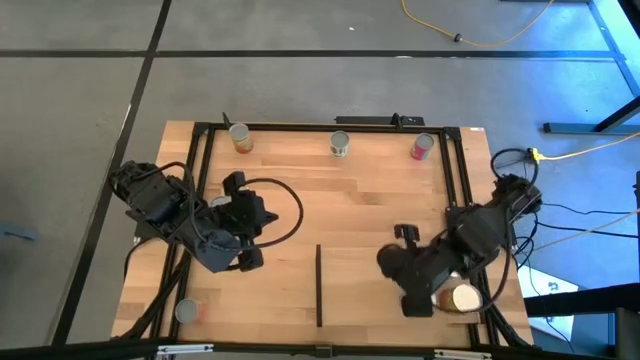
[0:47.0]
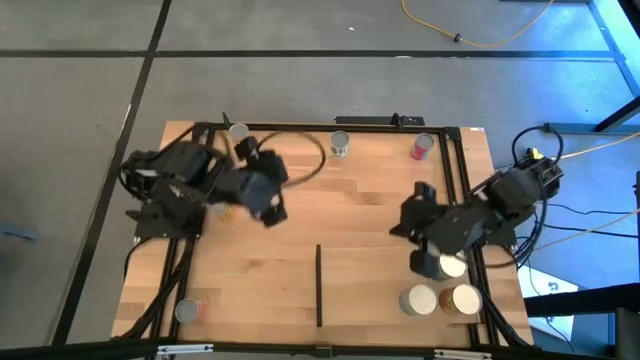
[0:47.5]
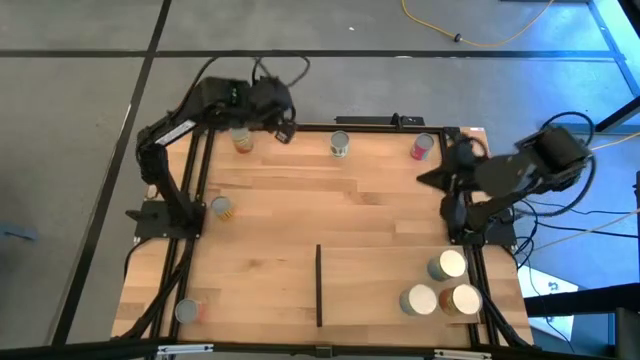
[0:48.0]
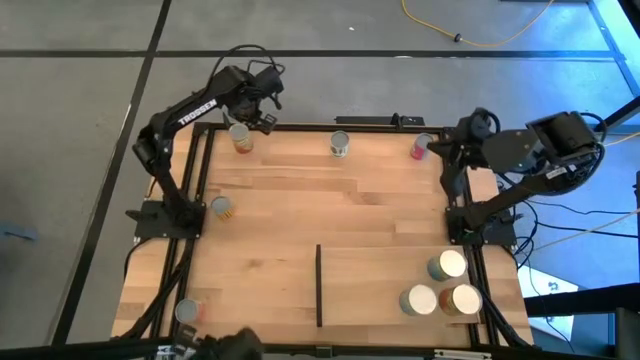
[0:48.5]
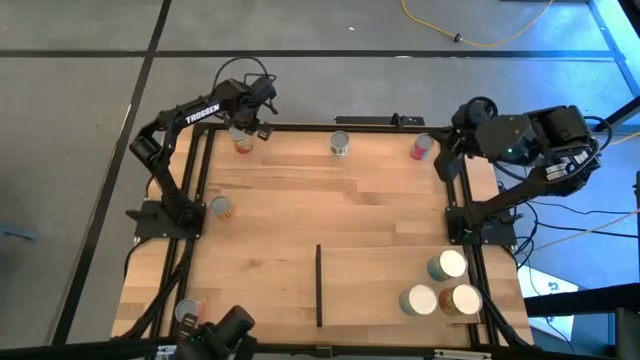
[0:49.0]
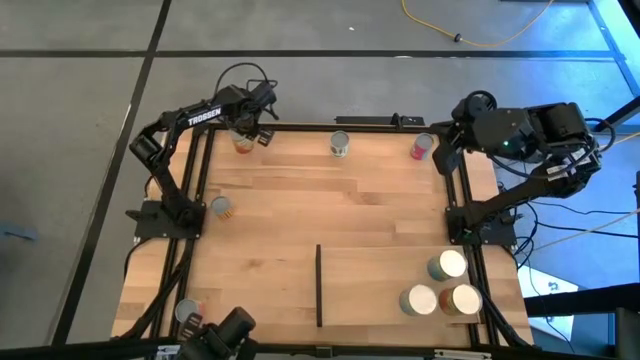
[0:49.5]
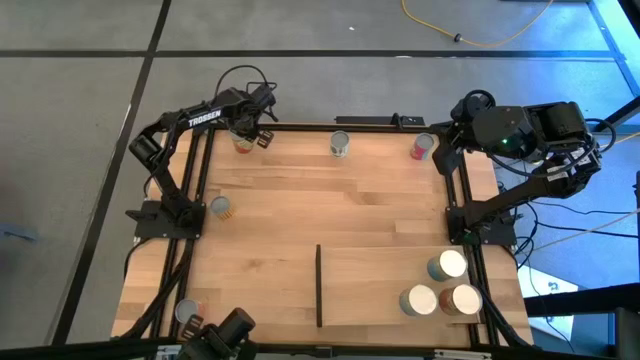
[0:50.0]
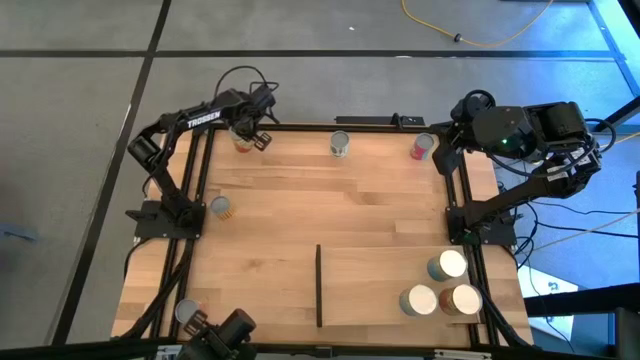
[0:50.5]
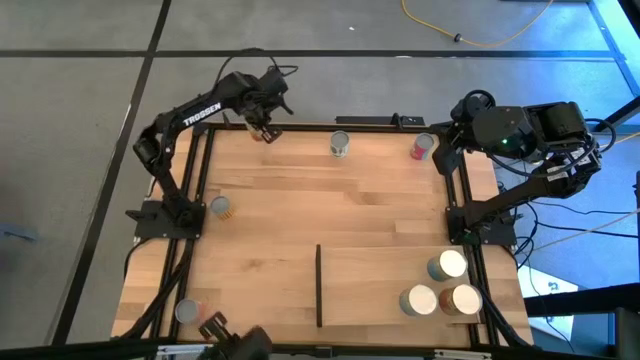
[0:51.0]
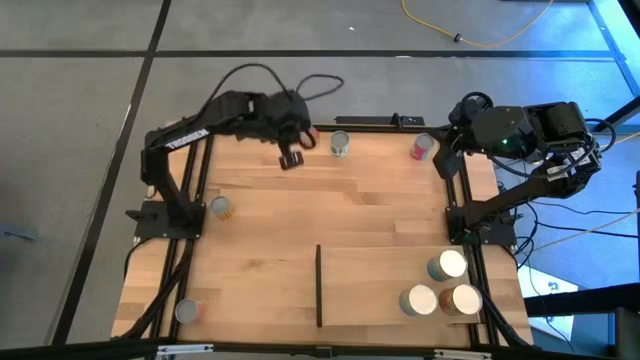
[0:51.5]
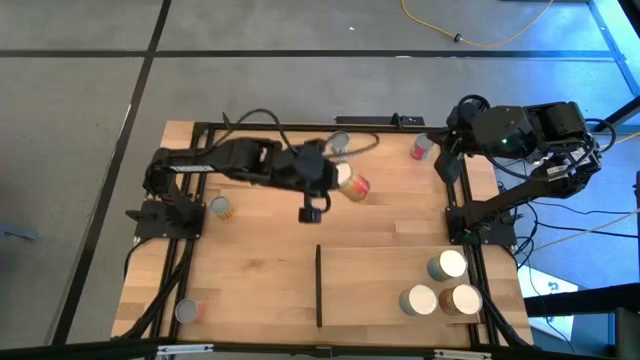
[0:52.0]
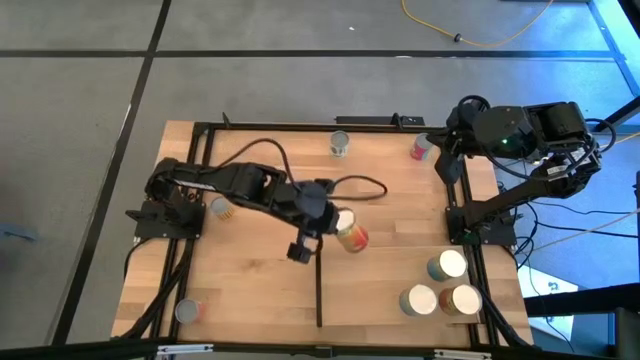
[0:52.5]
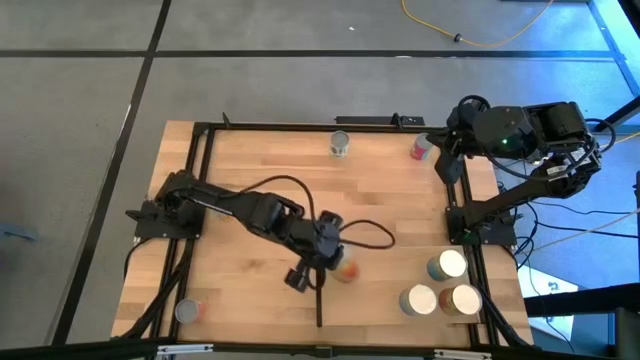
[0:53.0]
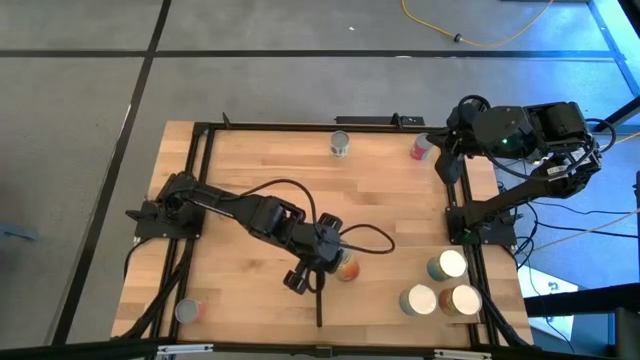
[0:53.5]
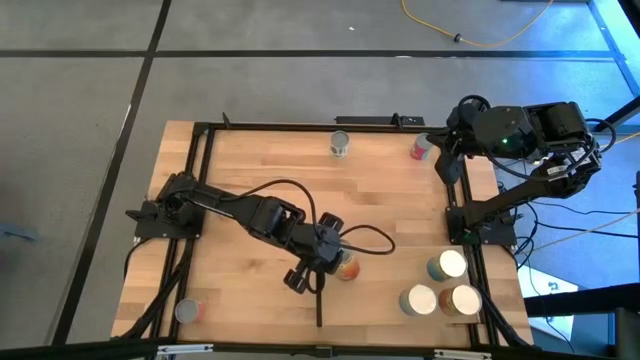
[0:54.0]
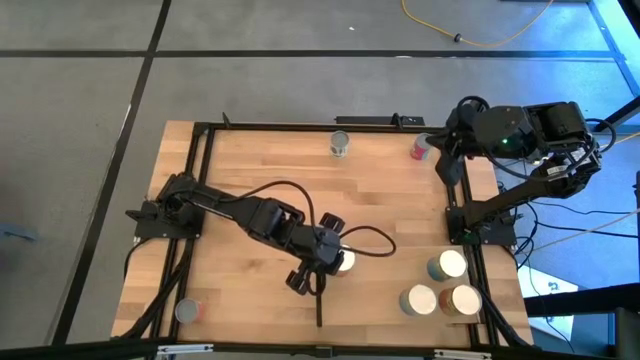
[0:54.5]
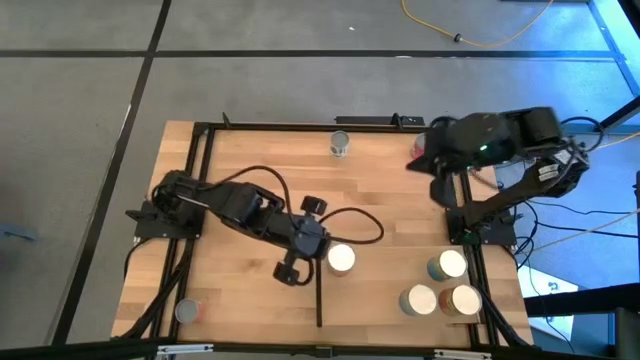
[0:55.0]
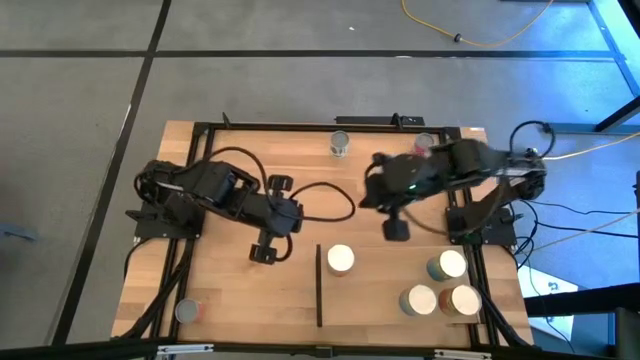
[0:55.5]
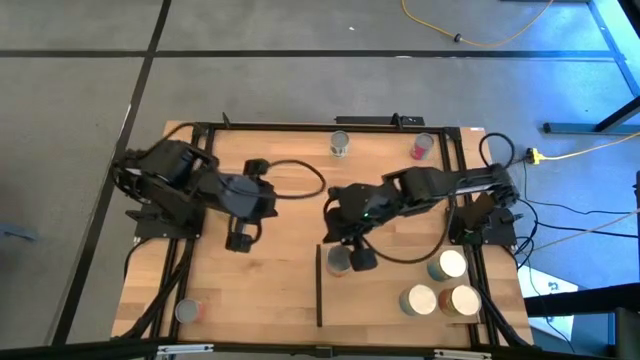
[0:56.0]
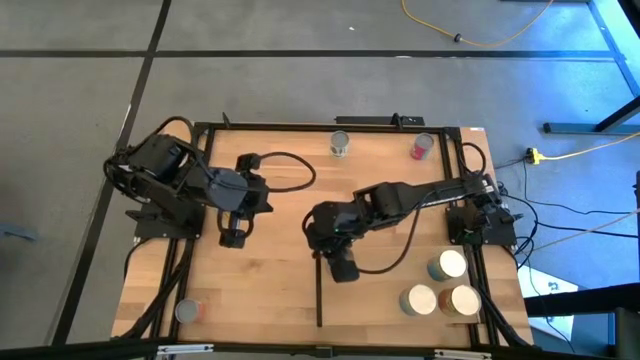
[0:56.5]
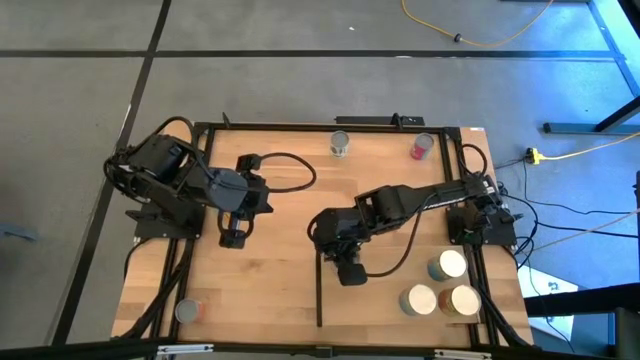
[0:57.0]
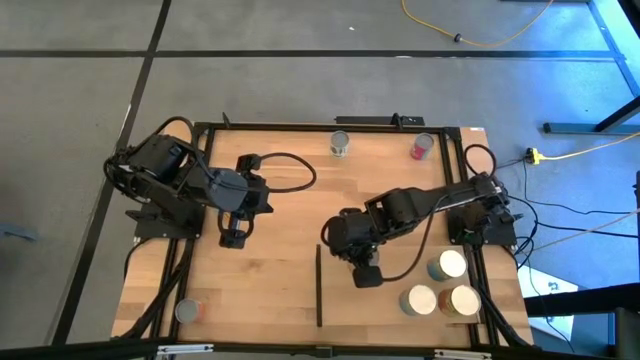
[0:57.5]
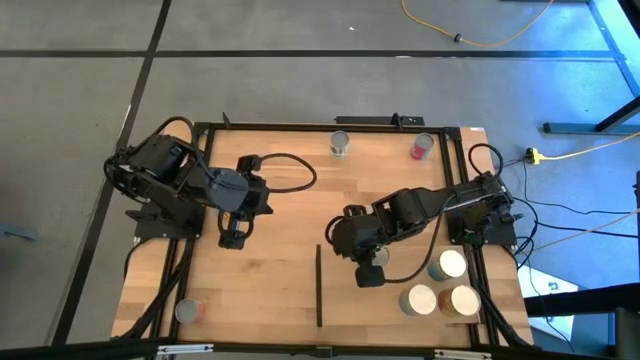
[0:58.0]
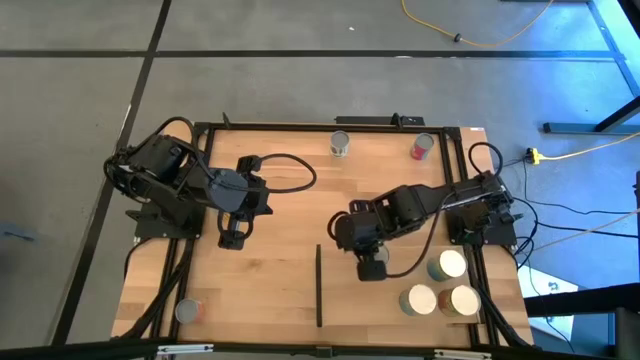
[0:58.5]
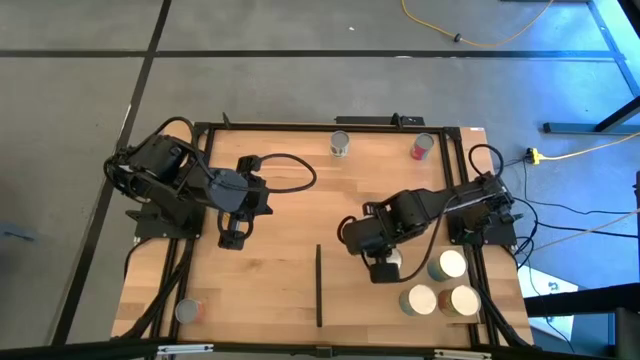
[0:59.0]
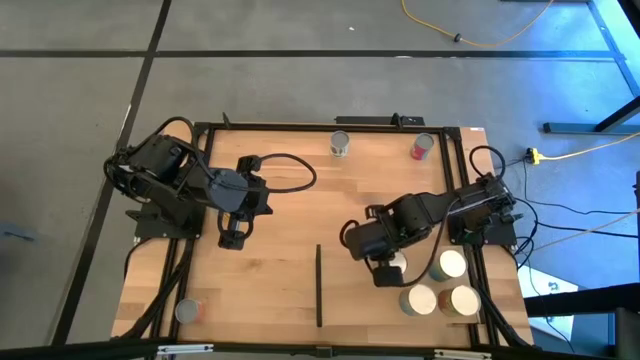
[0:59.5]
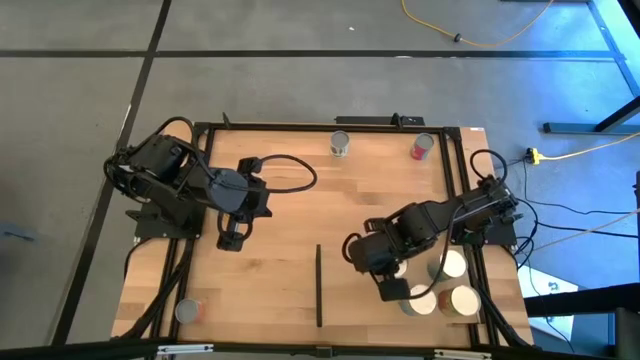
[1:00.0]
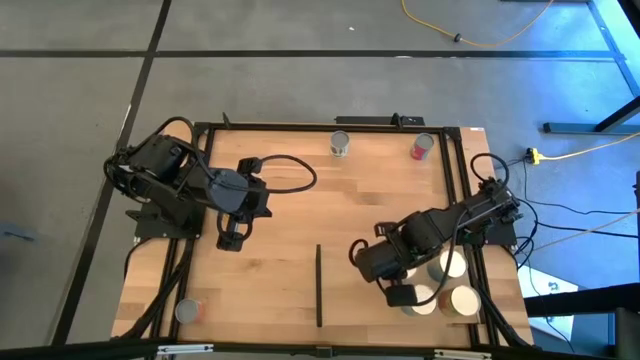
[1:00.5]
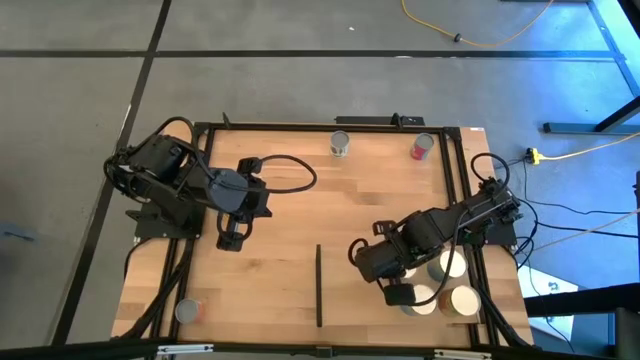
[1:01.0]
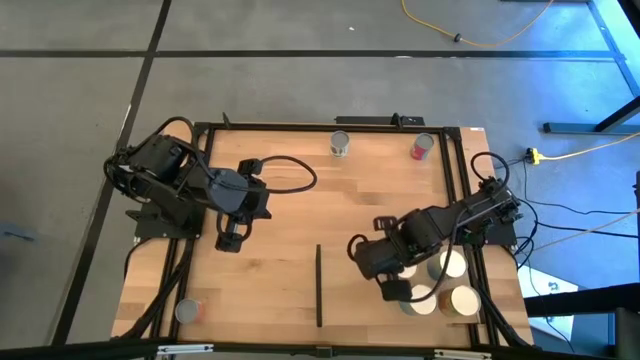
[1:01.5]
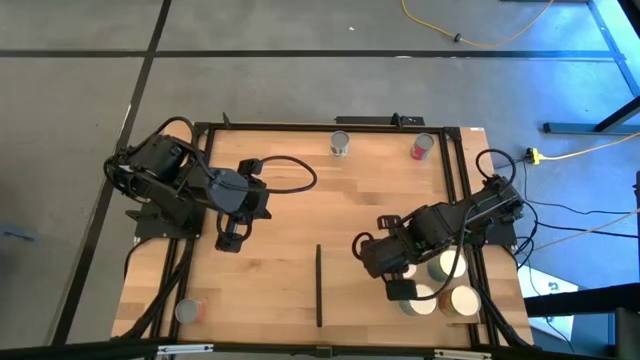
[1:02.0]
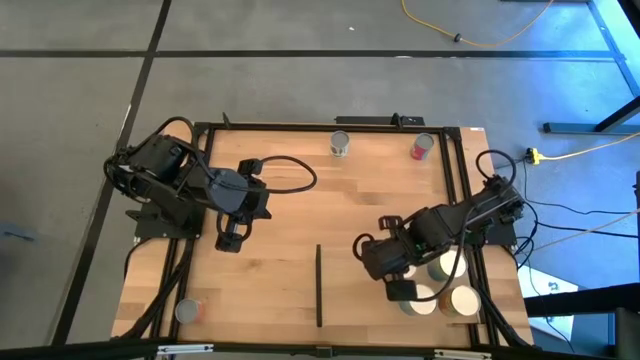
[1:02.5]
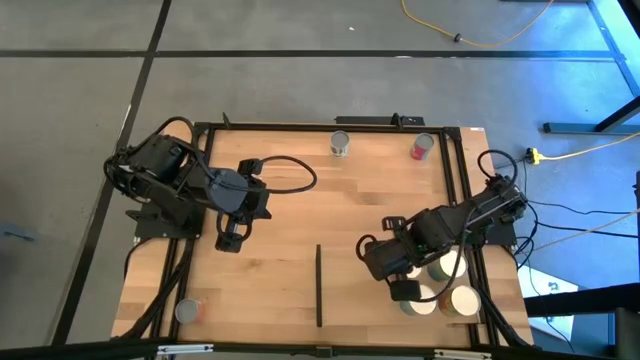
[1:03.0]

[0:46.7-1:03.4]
Task: Pick and place cans onto a shelf
Put the canned green beans on the shelf

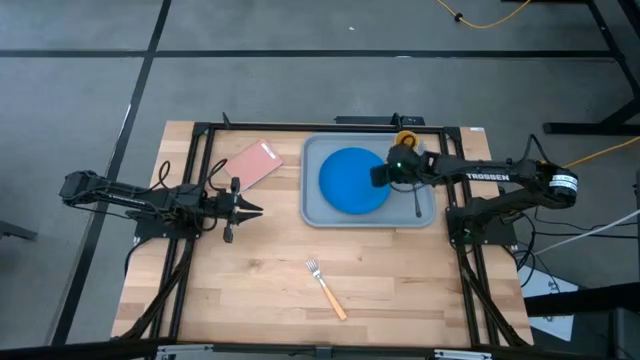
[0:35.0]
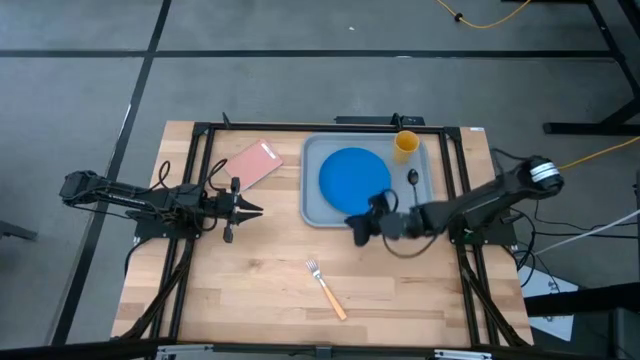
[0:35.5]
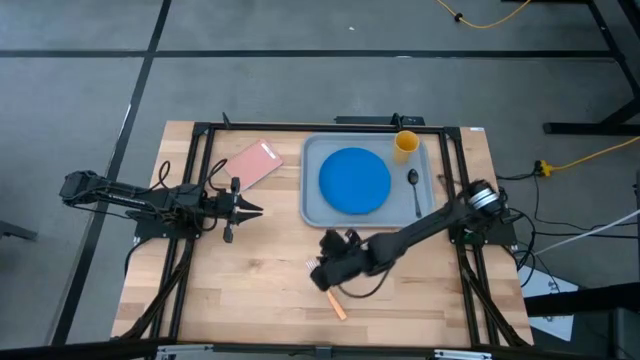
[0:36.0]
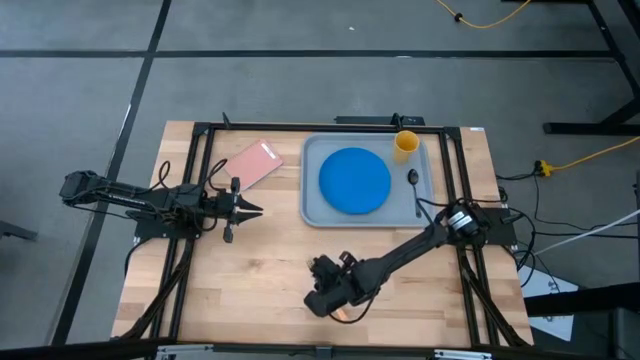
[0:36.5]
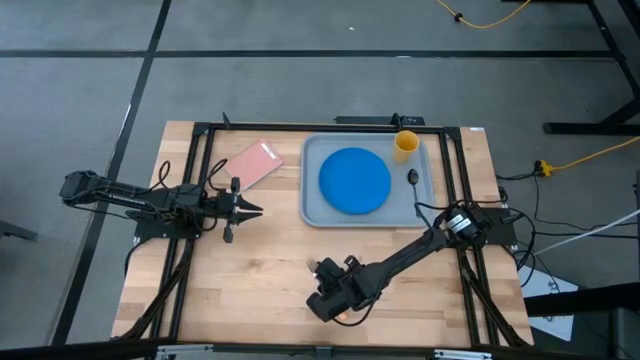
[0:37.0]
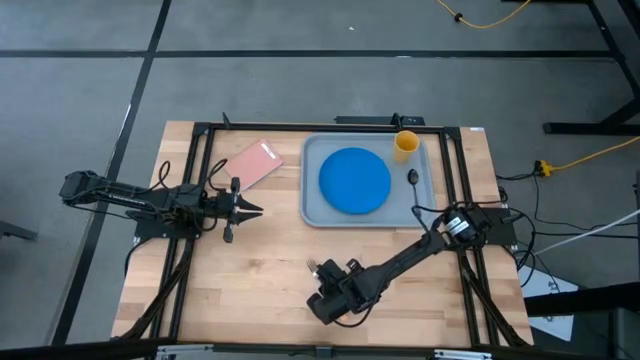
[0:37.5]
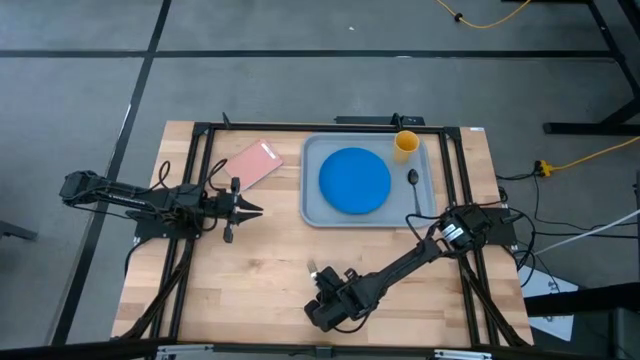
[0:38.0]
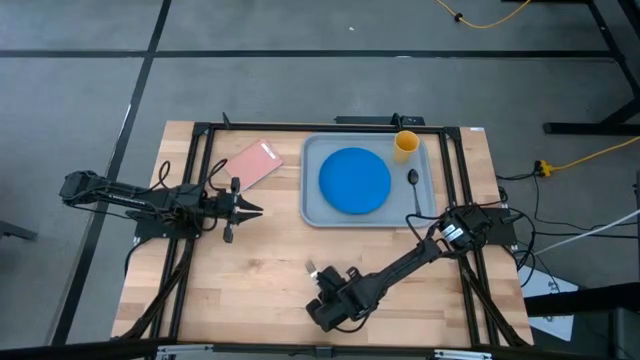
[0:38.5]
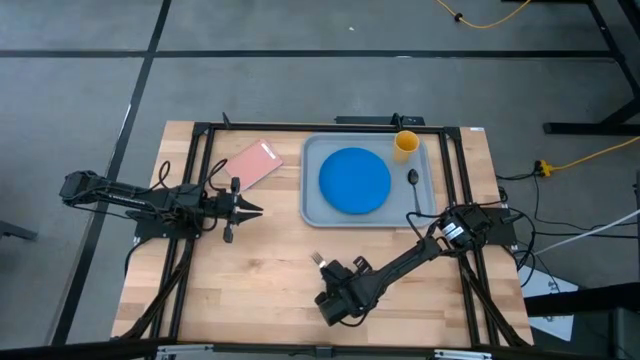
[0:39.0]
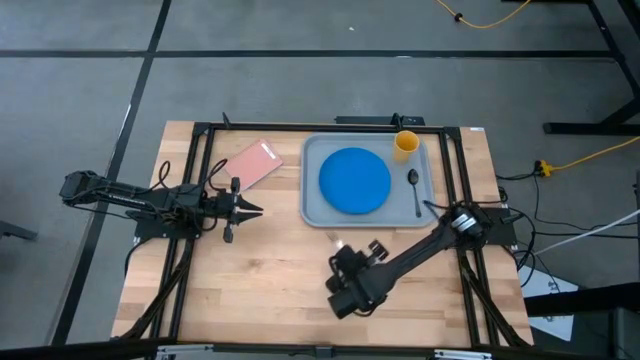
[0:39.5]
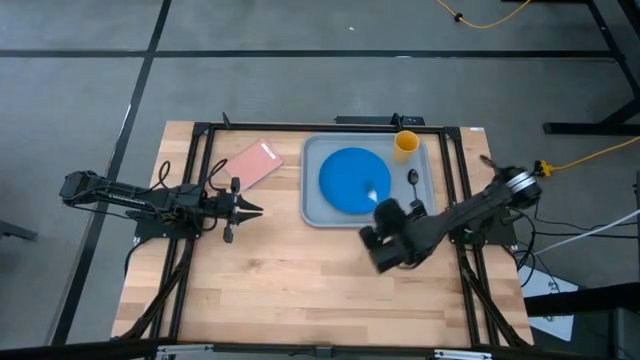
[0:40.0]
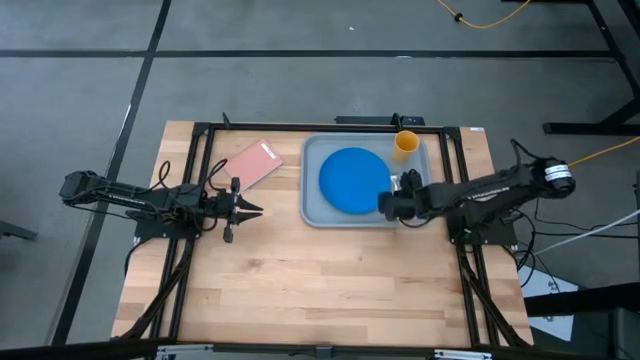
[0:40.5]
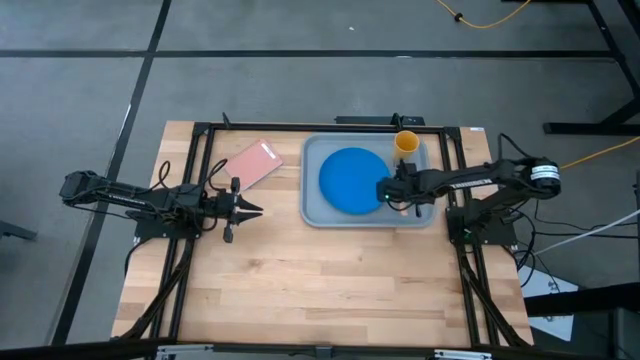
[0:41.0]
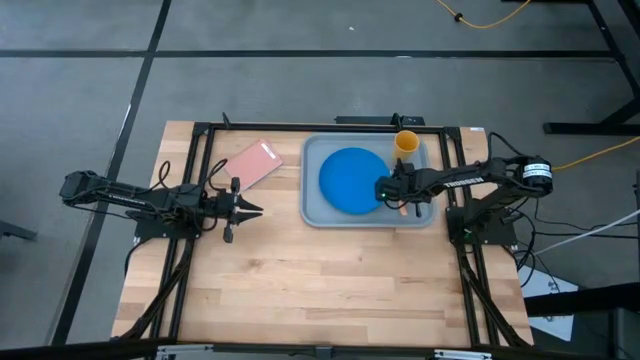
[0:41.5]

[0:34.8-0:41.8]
Task: Pick and place plate/cup/fork/spoon on tray
Put the fork on the gray tray
